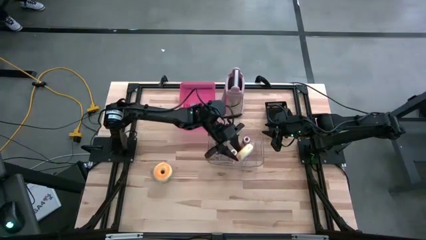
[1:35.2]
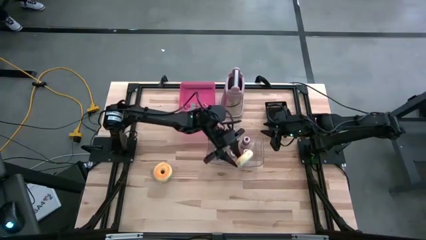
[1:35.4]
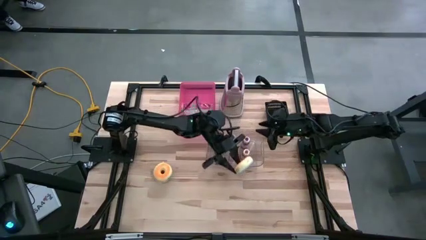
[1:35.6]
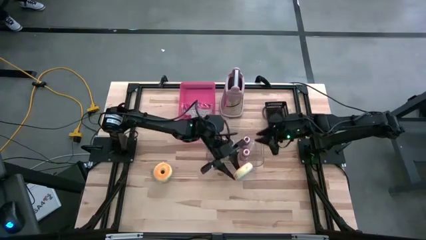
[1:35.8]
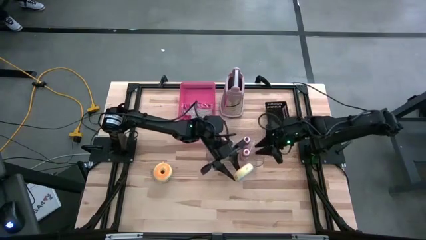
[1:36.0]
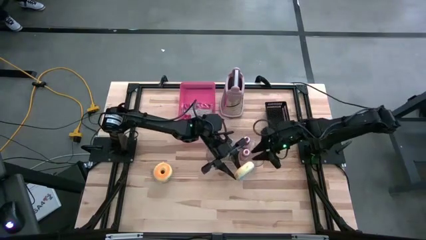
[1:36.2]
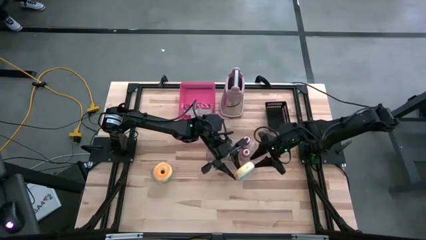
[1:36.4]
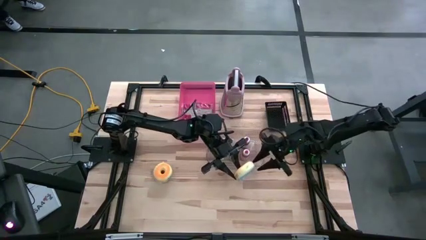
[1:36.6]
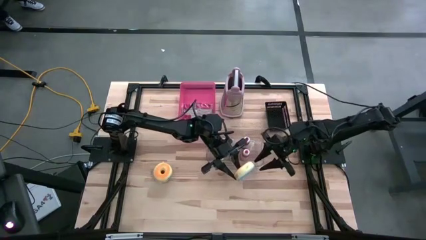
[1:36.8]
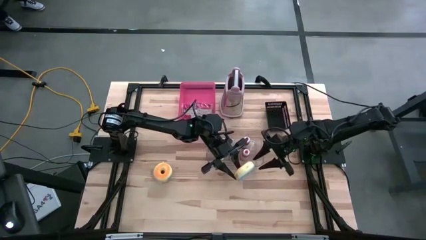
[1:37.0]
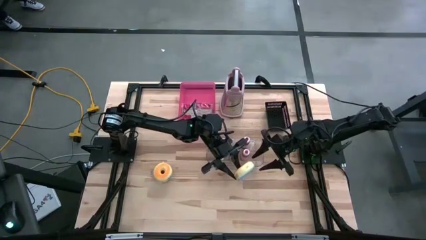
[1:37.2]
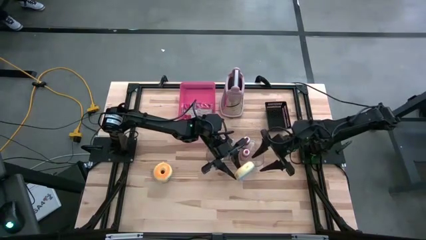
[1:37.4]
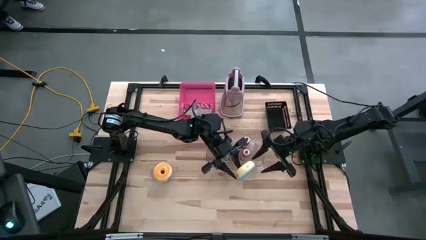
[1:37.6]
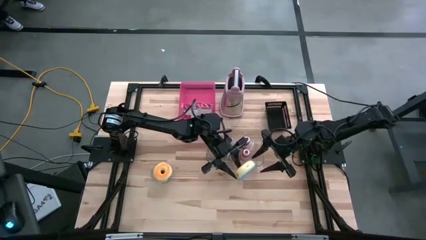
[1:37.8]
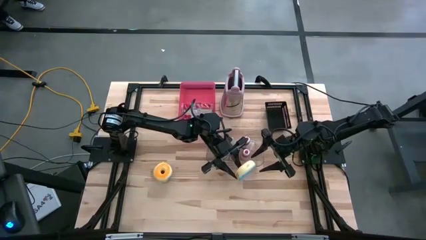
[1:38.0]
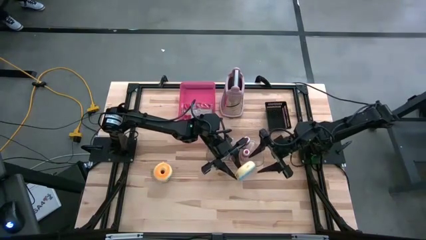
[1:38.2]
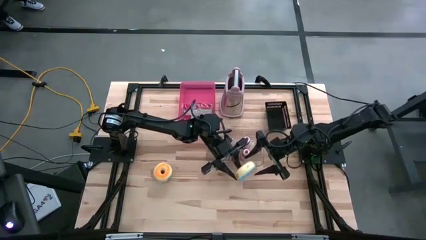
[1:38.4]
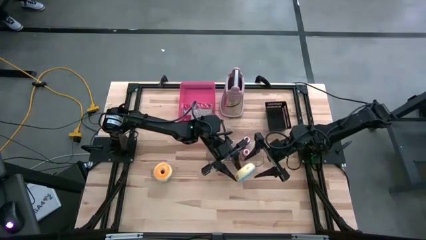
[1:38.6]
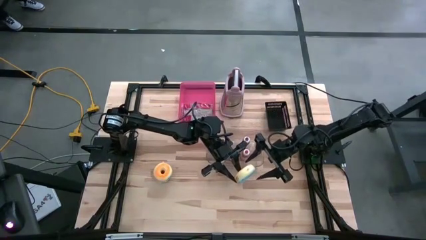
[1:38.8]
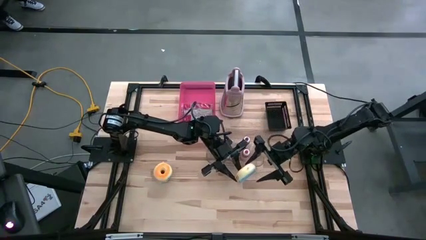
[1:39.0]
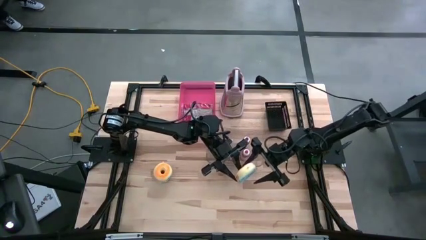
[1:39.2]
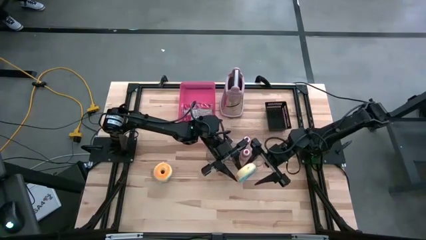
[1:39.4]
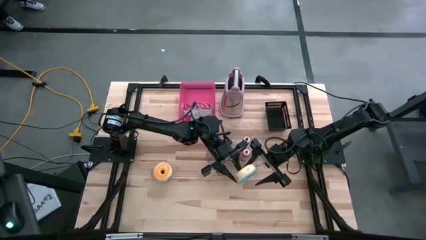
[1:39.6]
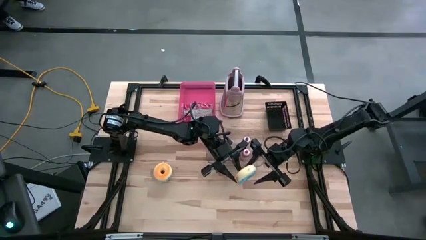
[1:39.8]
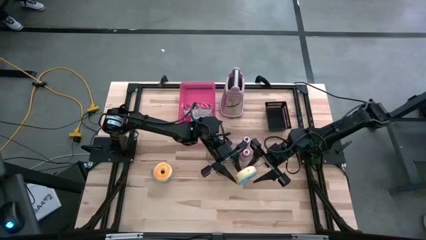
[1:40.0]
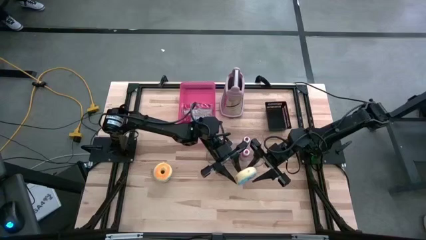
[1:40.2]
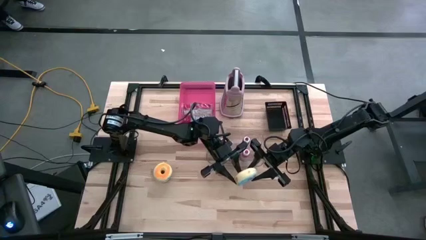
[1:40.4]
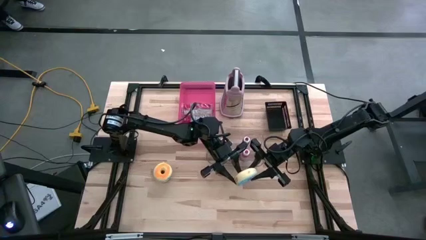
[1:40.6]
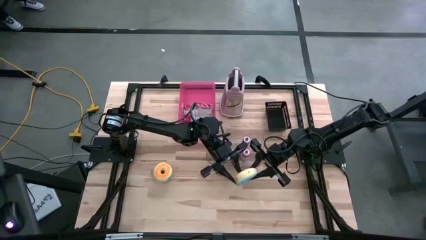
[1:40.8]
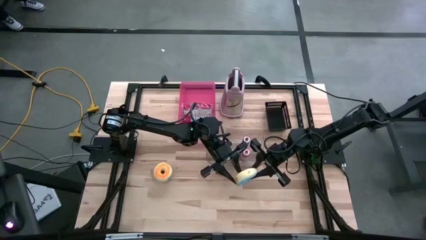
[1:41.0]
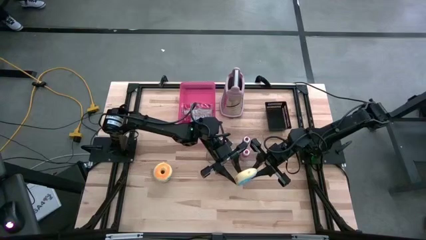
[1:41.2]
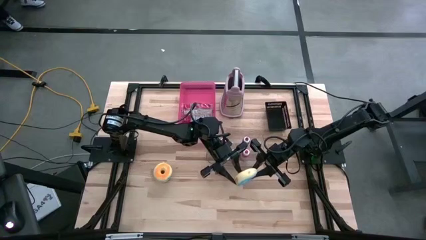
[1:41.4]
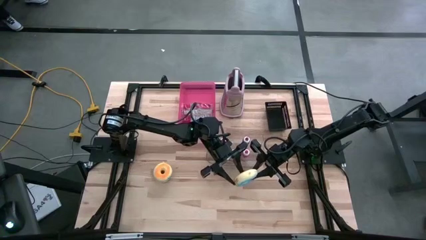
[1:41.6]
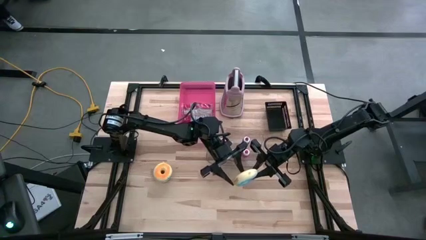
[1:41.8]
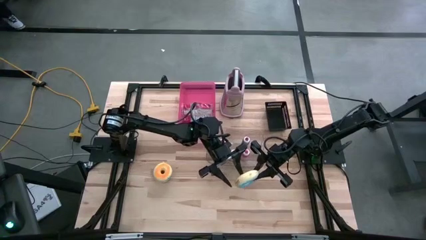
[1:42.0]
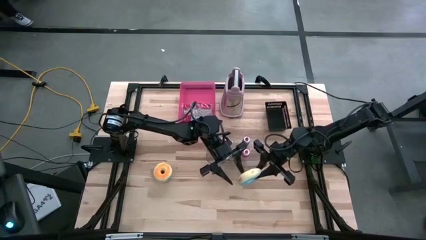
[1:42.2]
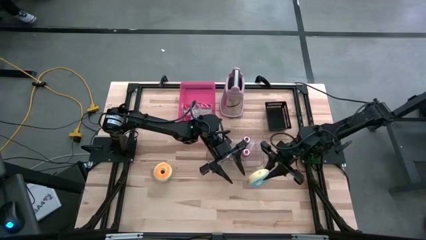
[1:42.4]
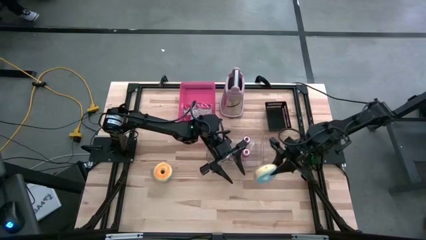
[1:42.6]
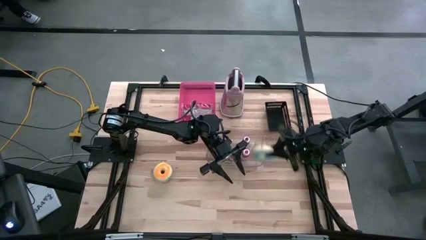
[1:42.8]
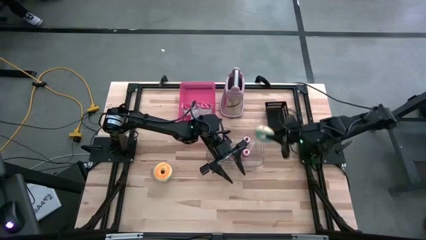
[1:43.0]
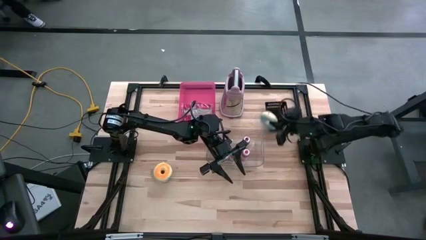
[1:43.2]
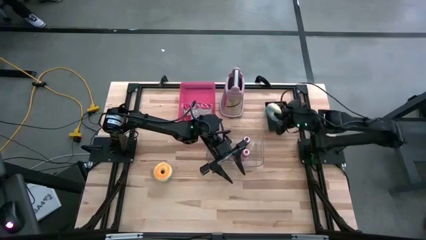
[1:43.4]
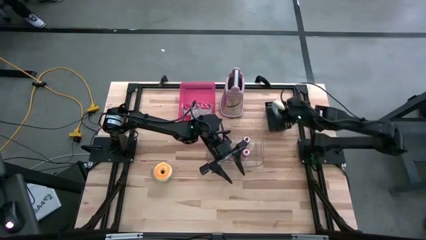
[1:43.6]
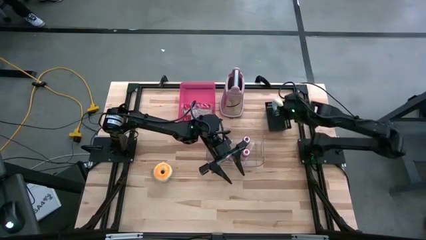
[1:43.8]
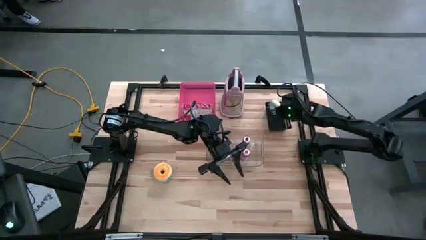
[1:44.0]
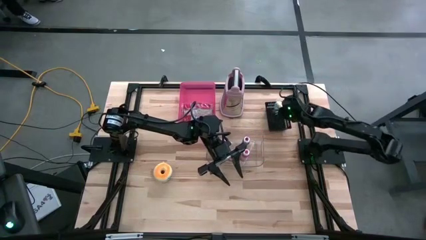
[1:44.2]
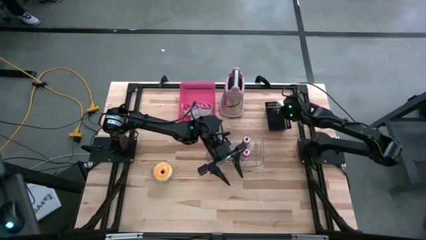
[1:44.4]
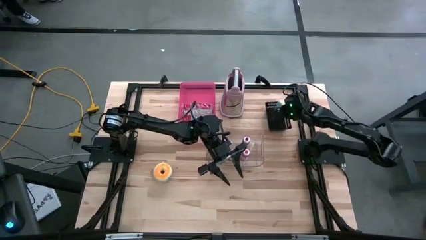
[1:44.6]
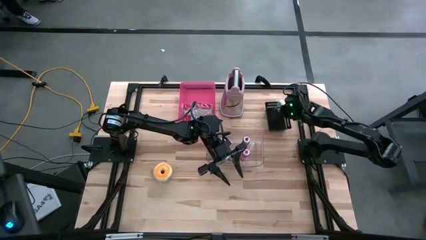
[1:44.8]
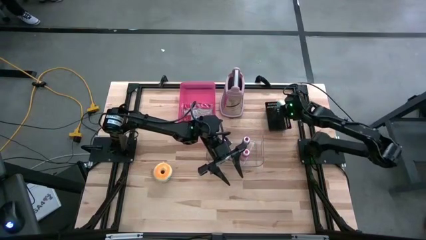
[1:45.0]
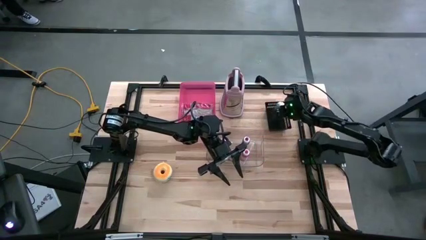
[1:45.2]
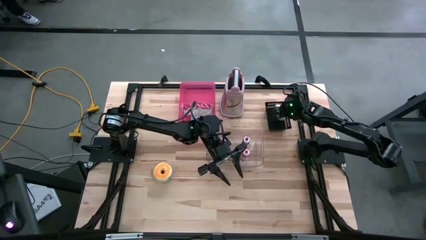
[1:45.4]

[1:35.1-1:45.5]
Put the bottom blue donut into the black bin
